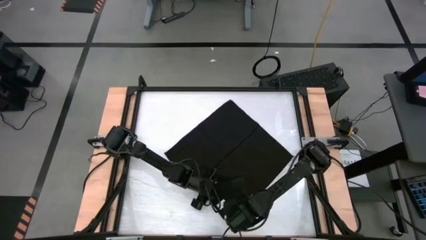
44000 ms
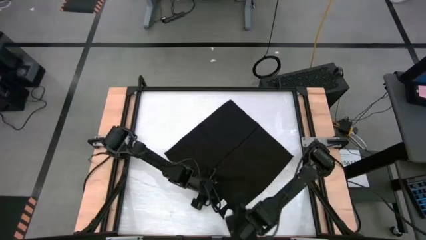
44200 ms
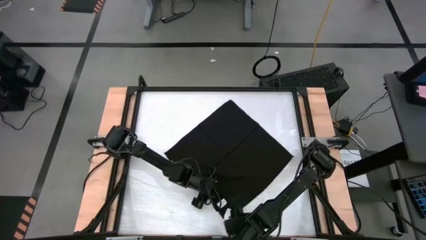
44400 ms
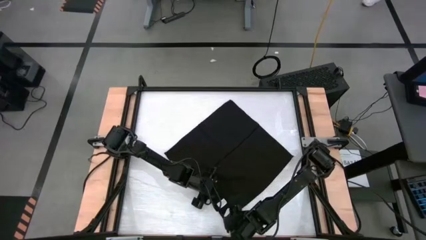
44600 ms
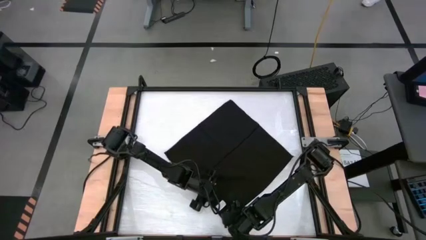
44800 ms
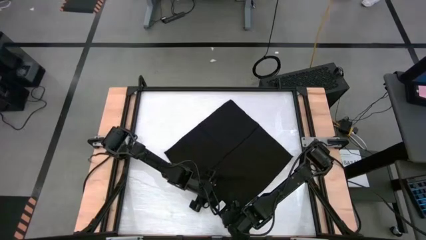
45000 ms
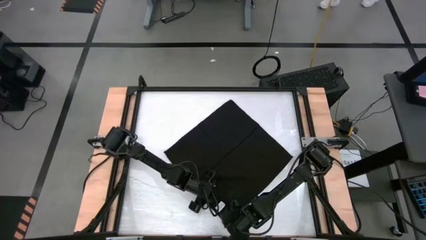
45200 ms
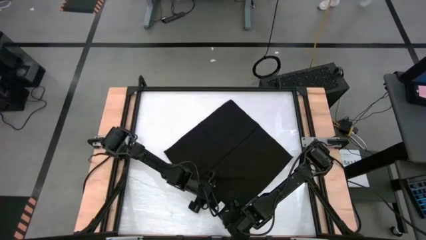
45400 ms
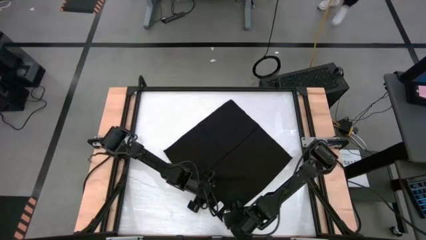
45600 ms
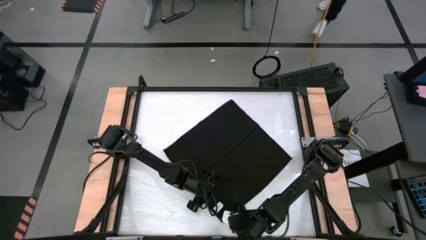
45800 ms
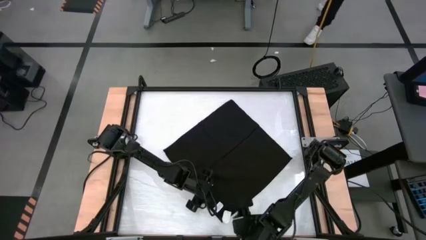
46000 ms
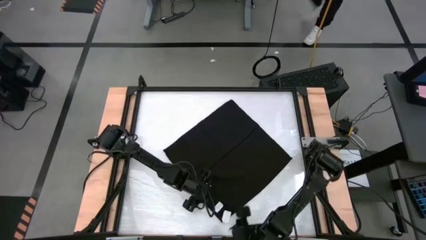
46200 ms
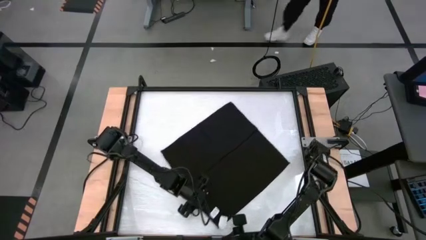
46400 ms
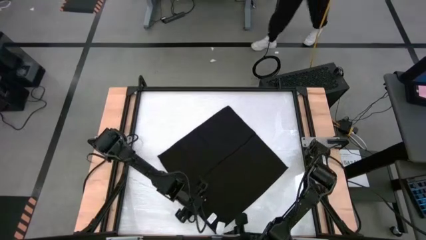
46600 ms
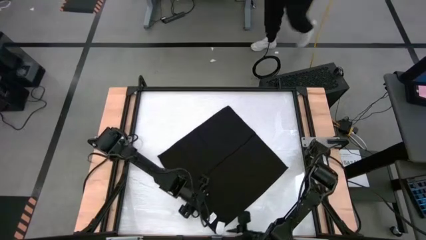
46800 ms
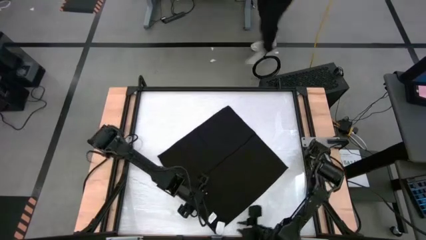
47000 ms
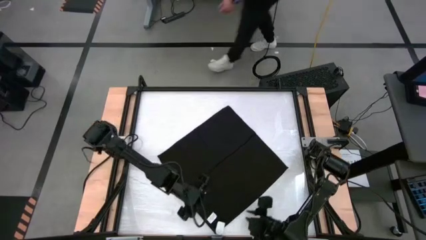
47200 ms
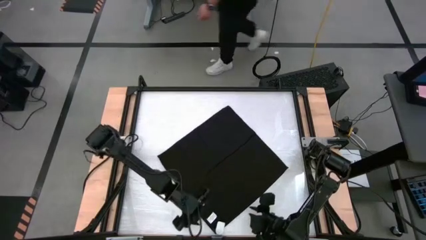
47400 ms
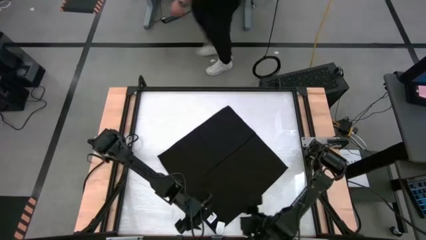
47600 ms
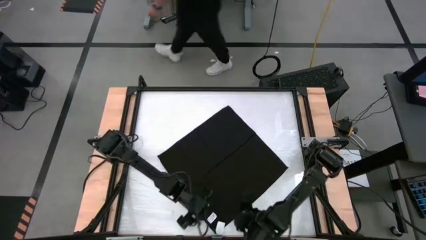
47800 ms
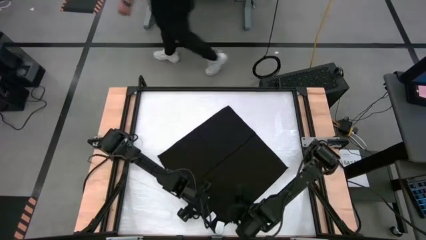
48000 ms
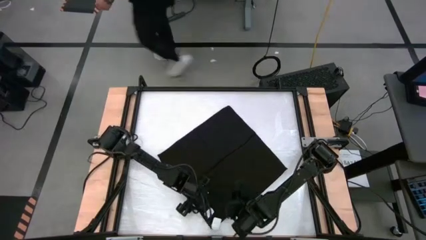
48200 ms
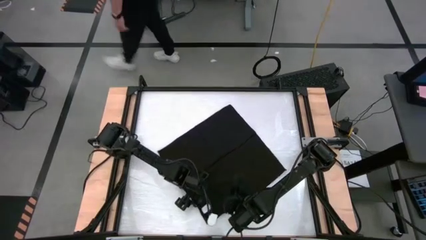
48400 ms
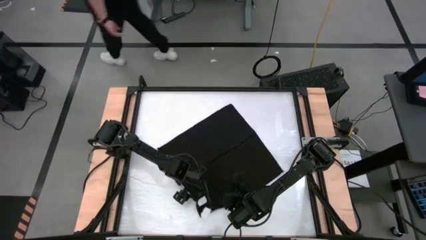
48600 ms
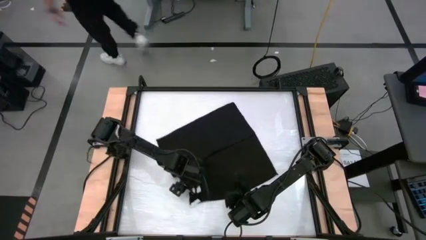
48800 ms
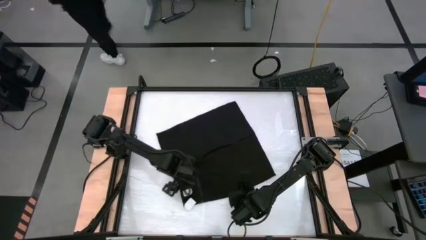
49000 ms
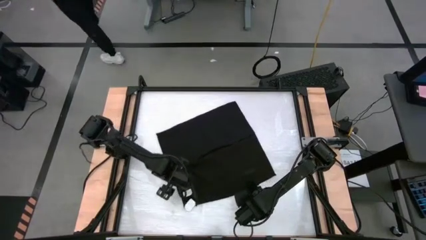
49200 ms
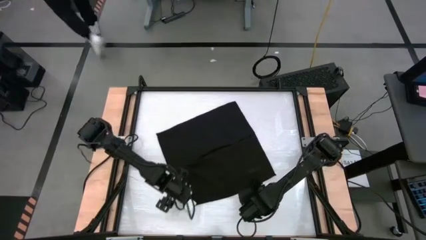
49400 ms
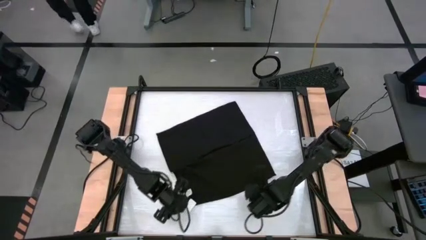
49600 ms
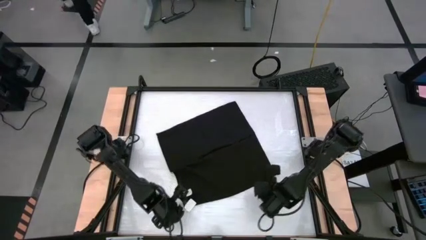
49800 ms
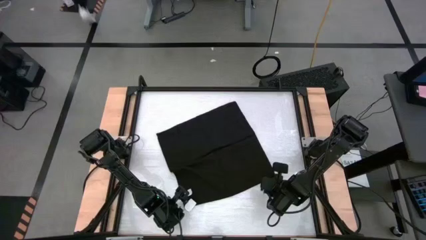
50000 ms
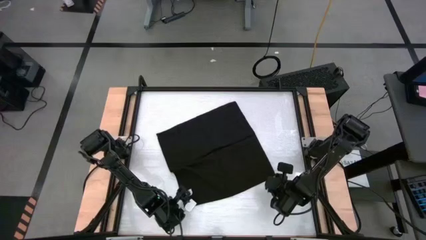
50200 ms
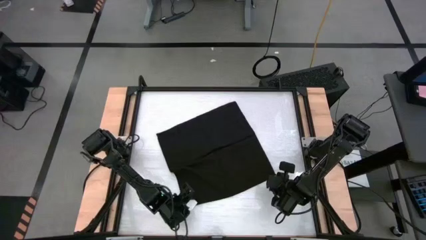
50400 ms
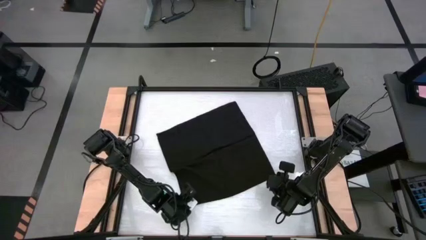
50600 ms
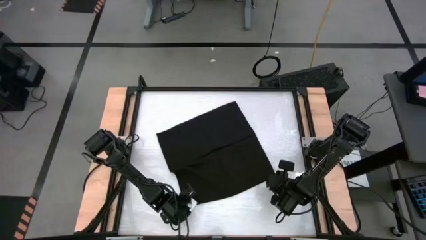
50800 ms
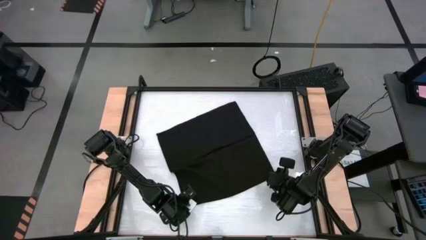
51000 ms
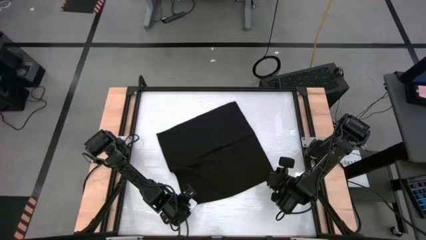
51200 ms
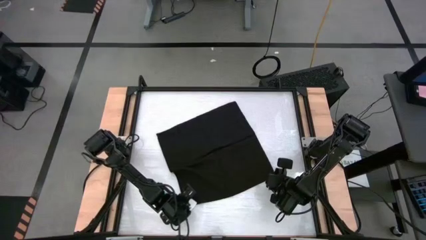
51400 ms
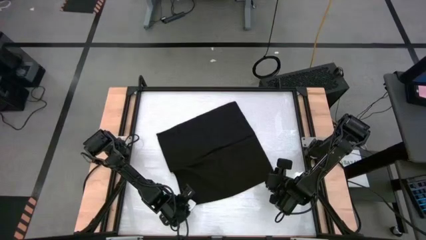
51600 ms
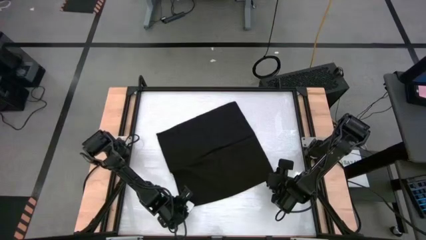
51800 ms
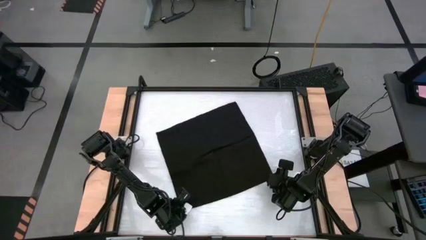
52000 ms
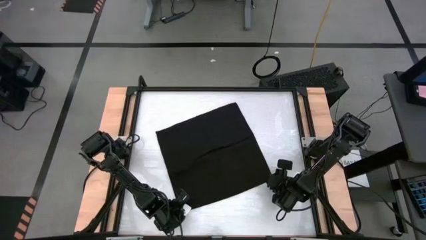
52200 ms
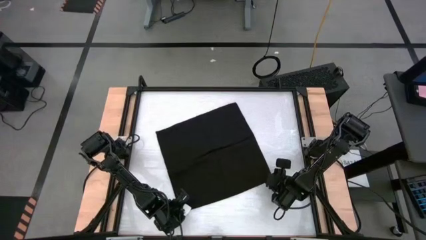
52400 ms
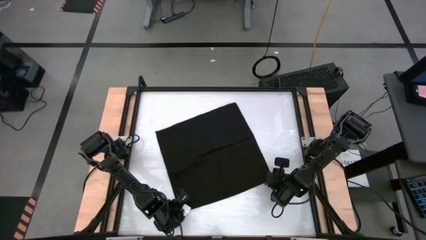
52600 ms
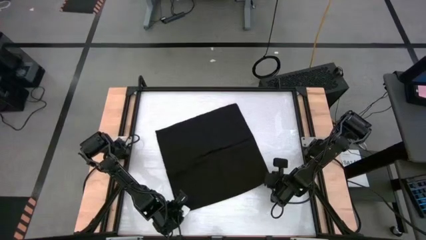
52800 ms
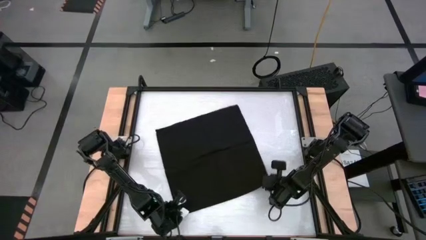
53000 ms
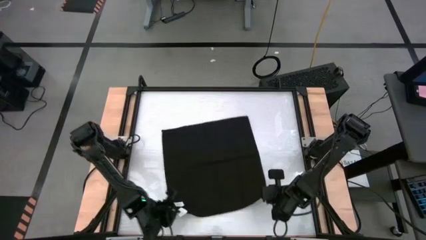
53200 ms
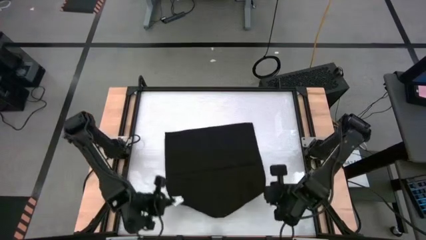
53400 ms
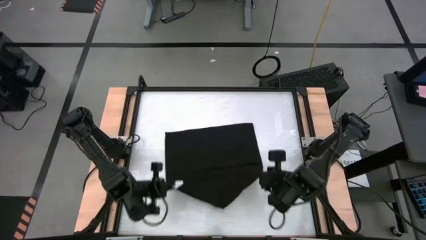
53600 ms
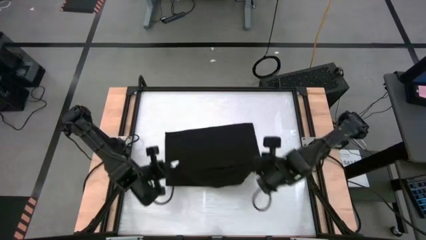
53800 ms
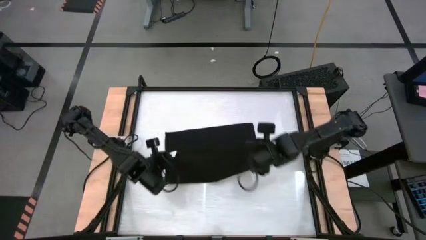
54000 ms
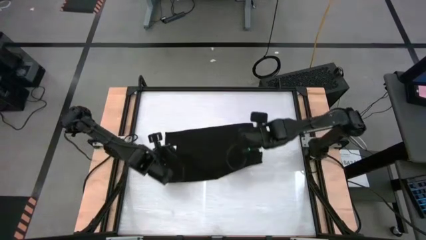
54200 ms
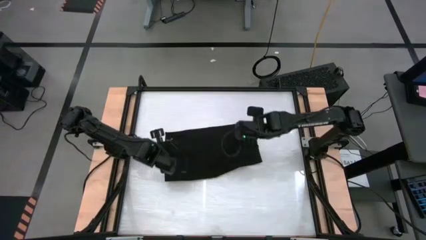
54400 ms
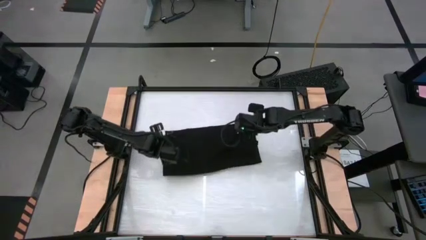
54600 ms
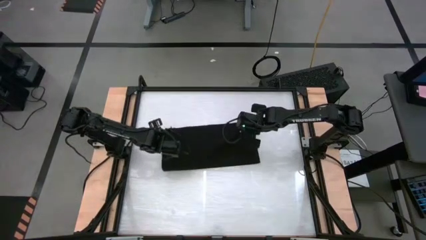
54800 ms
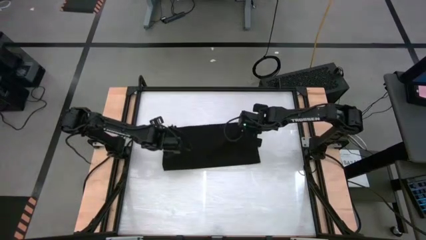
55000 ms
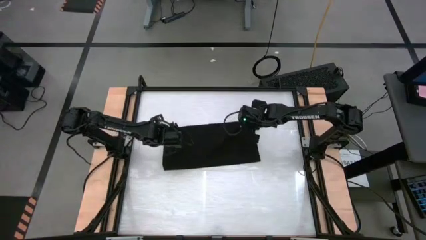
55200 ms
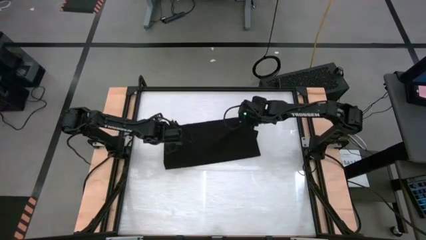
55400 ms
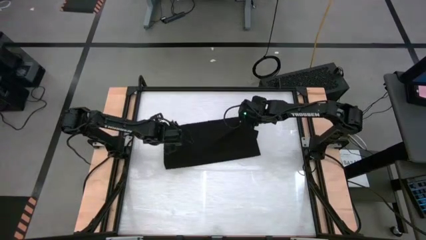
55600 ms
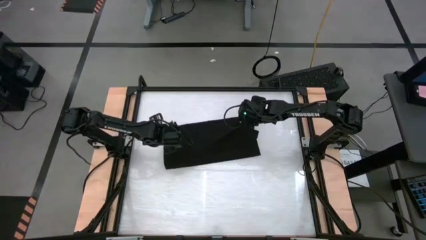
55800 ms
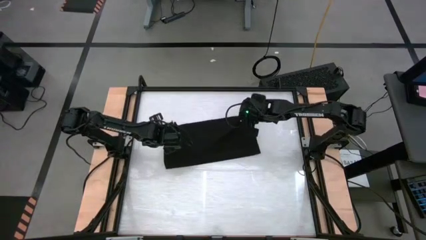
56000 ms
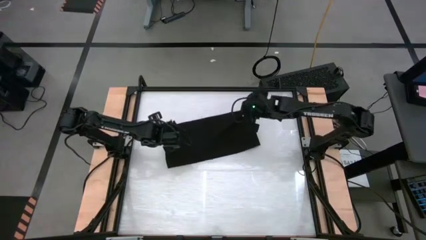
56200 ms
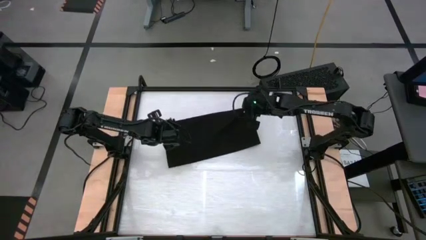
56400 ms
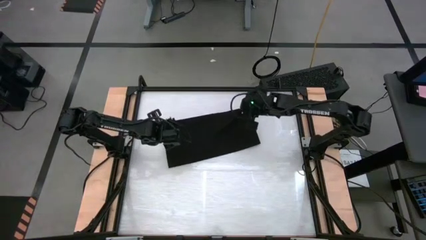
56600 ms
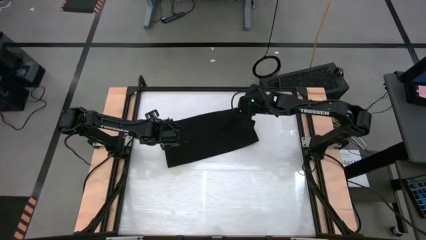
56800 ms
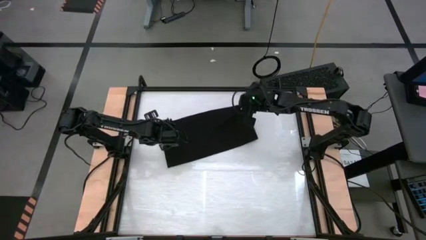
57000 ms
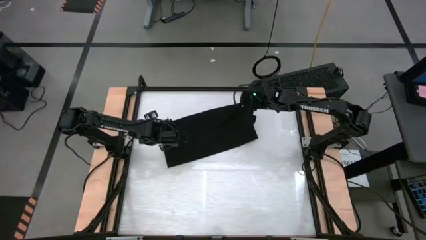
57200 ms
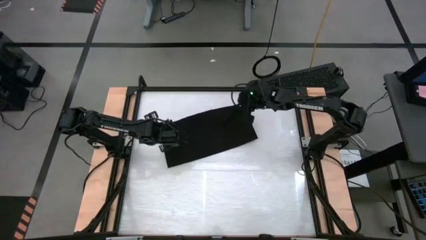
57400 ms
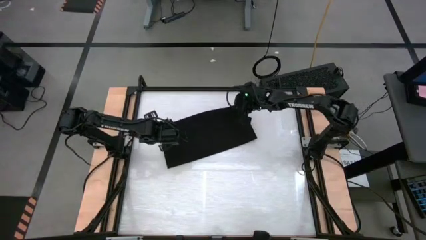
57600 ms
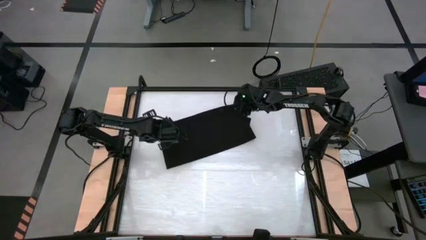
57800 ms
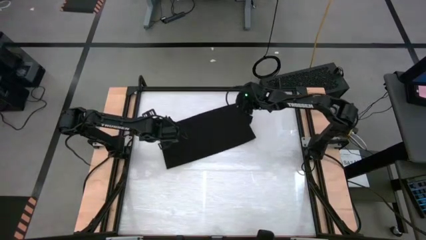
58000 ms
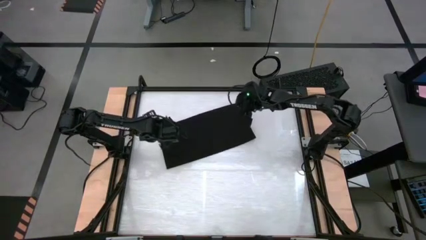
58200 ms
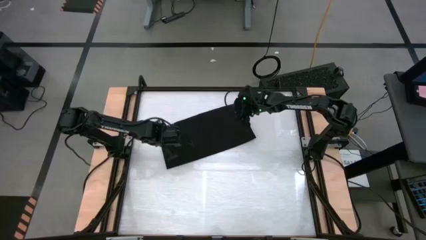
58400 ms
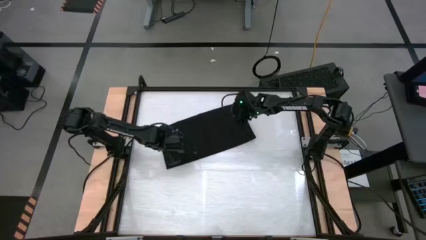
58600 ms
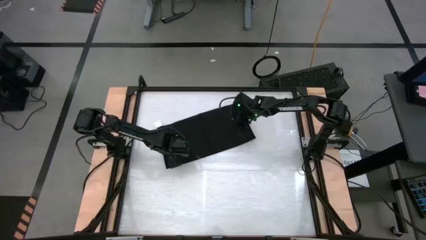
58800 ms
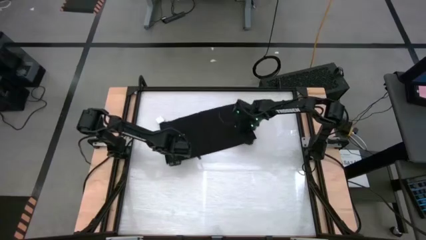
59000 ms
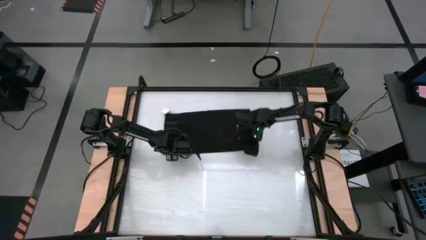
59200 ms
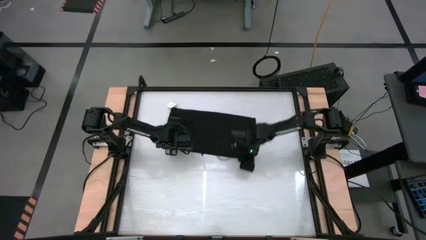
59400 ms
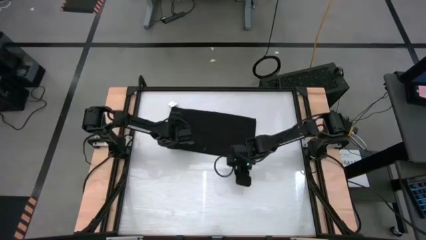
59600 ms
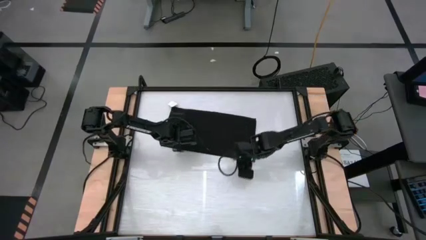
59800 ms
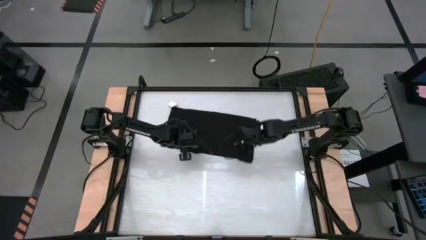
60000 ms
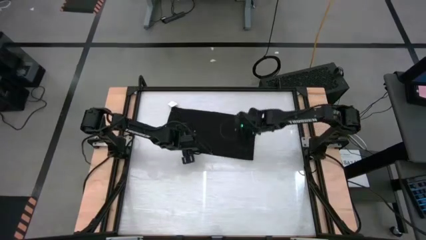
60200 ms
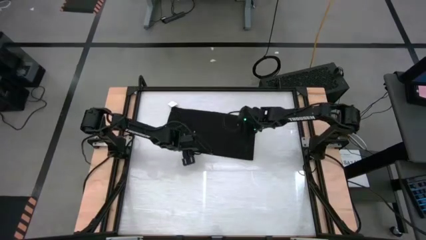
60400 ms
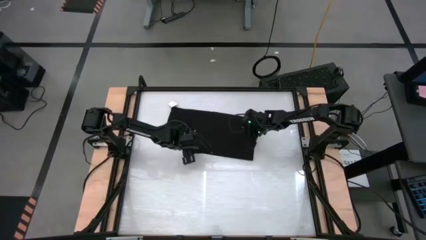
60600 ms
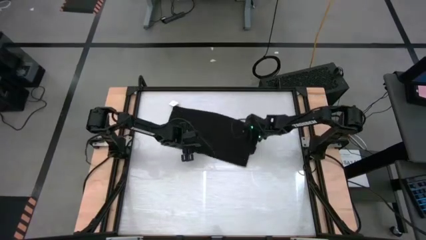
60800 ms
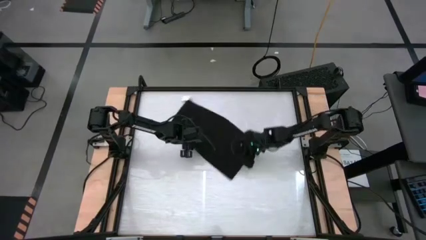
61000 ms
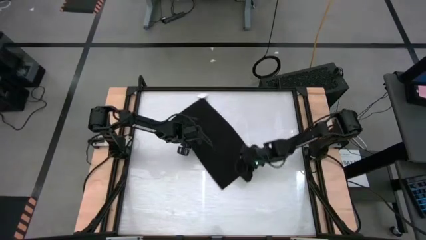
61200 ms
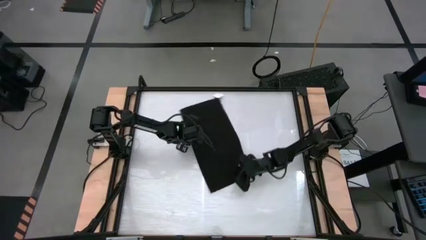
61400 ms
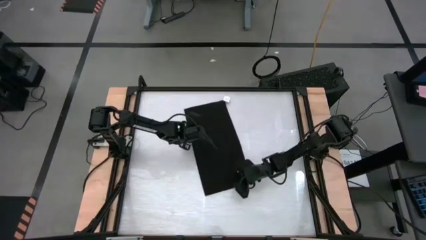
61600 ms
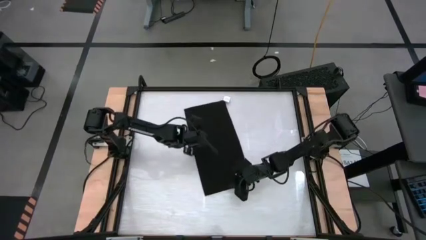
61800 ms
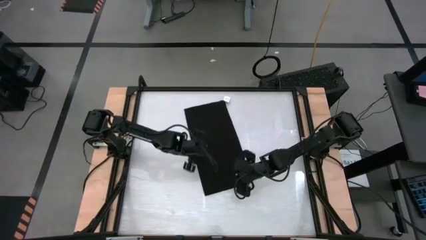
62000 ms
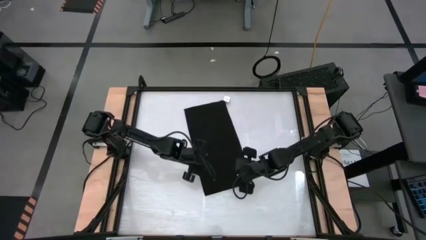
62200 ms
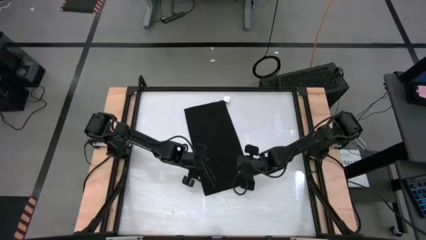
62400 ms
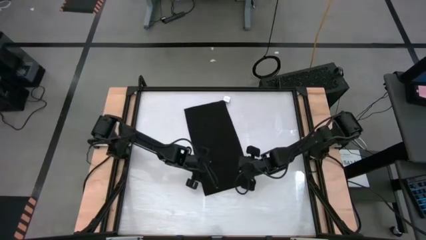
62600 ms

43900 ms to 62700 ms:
Task: Roll napkin
Roll the black napkin
